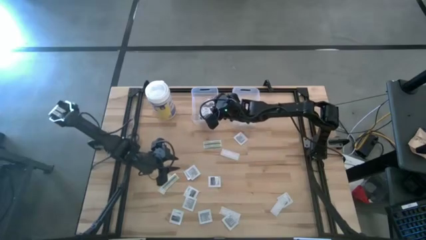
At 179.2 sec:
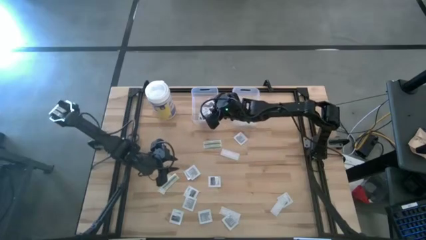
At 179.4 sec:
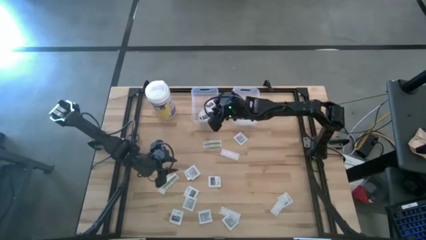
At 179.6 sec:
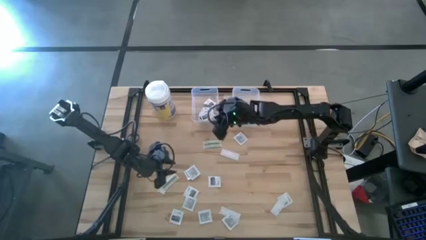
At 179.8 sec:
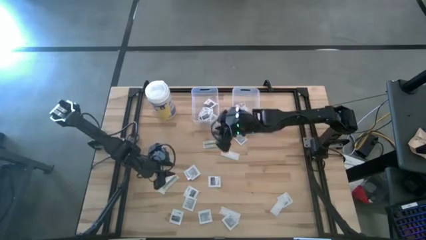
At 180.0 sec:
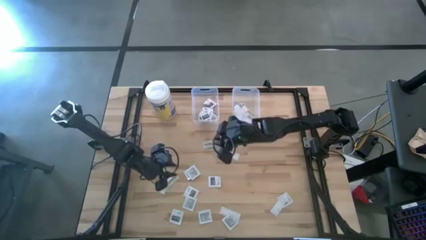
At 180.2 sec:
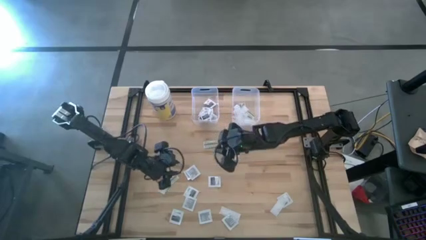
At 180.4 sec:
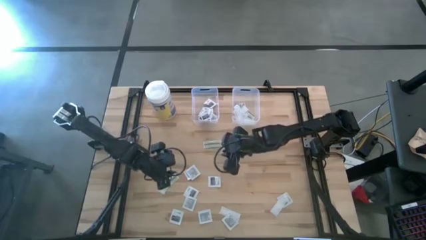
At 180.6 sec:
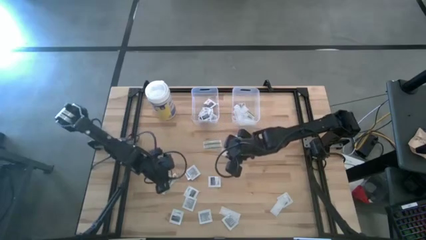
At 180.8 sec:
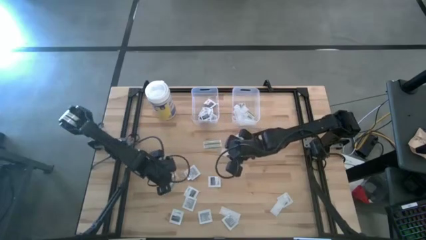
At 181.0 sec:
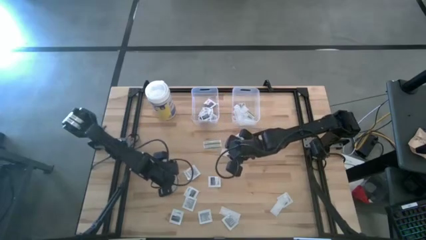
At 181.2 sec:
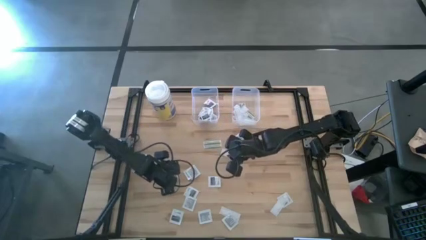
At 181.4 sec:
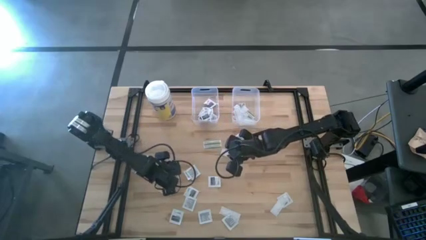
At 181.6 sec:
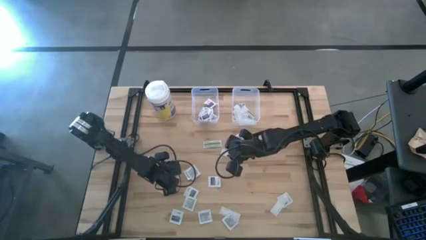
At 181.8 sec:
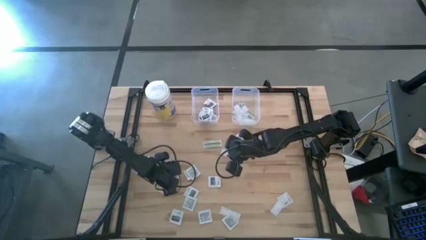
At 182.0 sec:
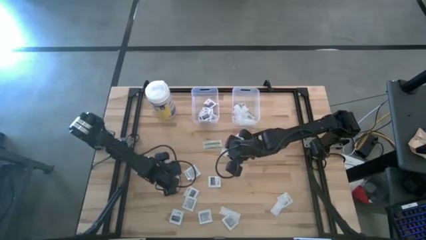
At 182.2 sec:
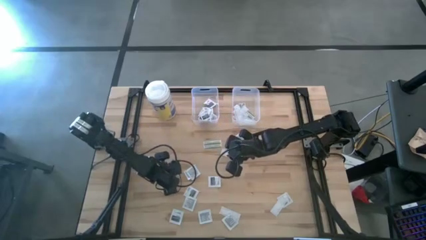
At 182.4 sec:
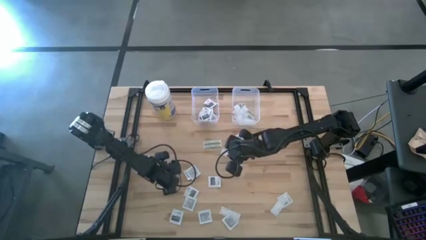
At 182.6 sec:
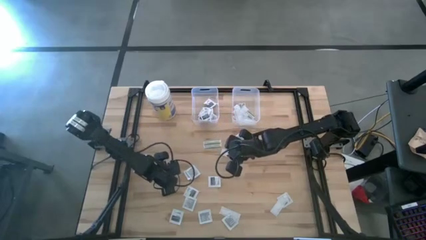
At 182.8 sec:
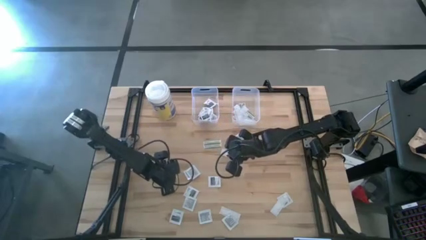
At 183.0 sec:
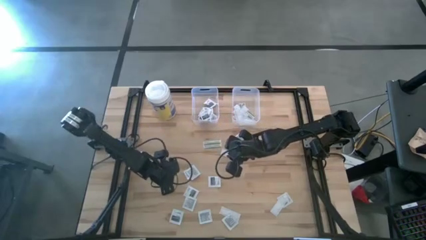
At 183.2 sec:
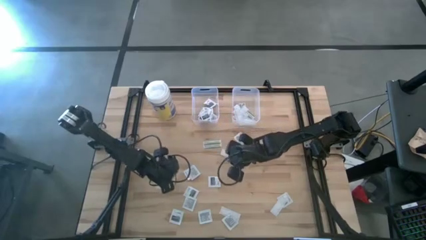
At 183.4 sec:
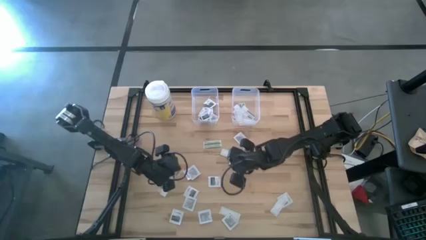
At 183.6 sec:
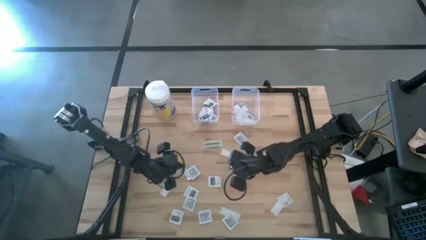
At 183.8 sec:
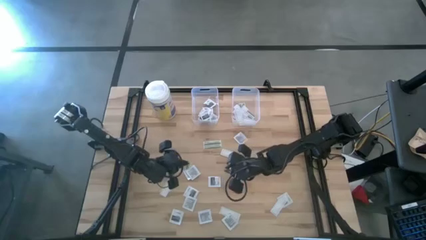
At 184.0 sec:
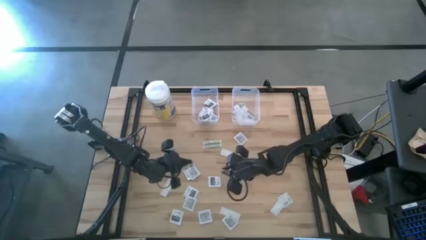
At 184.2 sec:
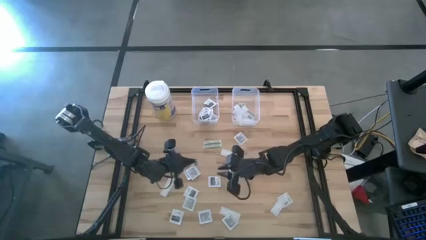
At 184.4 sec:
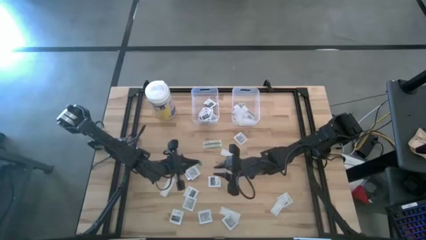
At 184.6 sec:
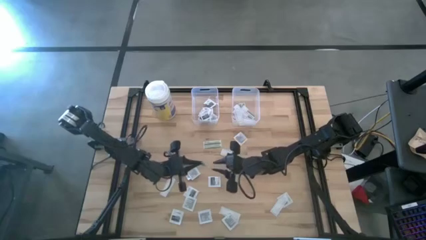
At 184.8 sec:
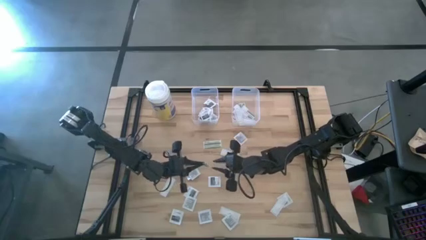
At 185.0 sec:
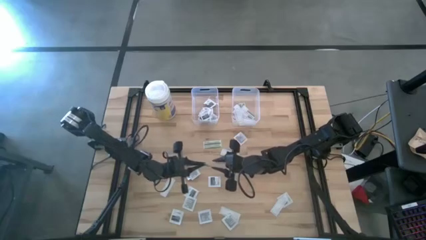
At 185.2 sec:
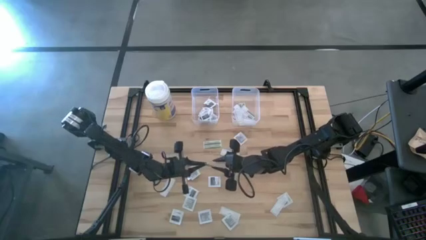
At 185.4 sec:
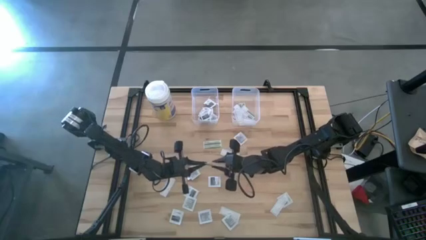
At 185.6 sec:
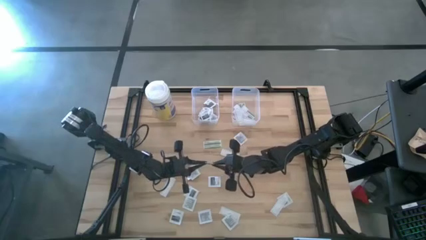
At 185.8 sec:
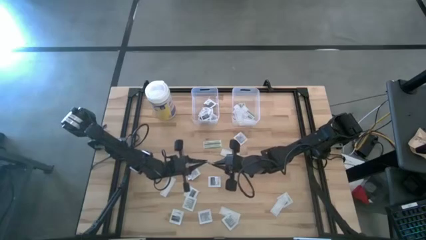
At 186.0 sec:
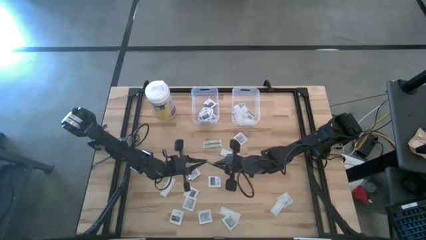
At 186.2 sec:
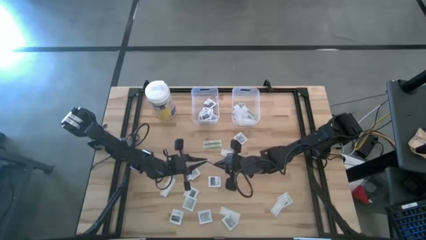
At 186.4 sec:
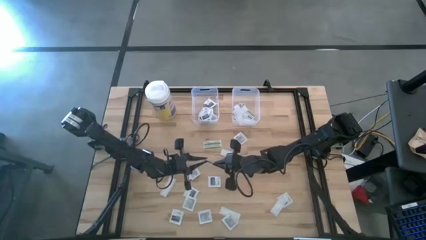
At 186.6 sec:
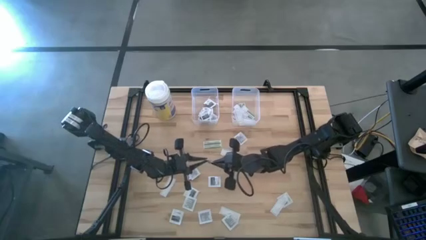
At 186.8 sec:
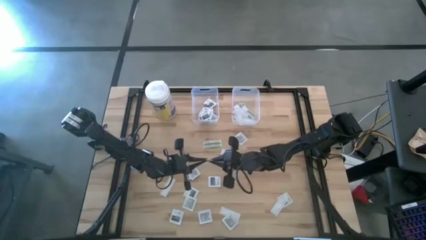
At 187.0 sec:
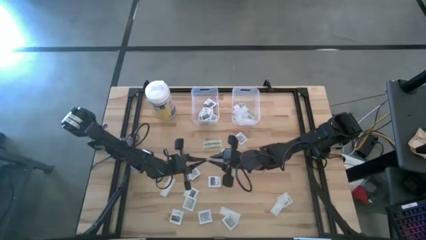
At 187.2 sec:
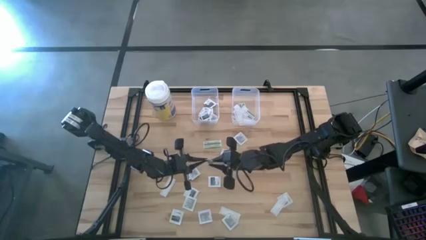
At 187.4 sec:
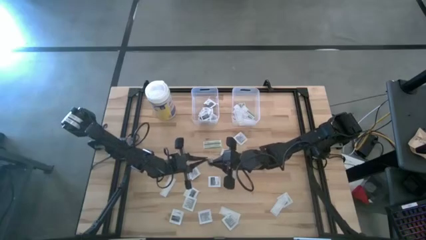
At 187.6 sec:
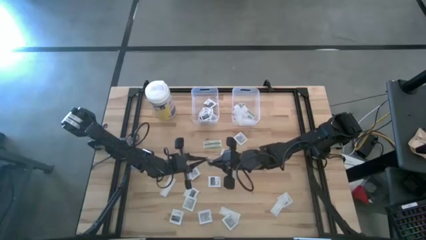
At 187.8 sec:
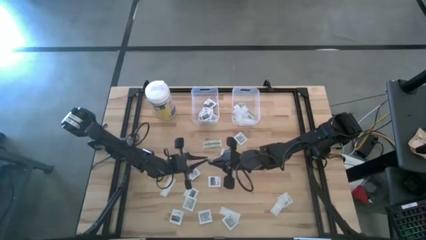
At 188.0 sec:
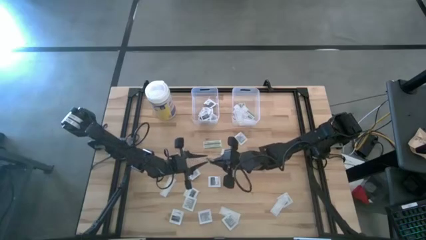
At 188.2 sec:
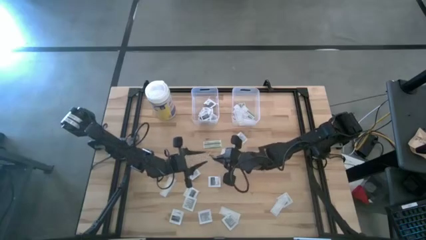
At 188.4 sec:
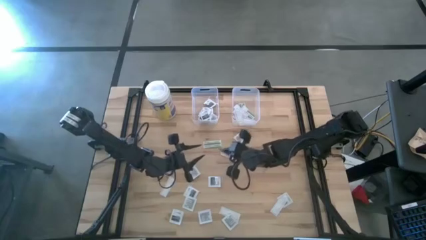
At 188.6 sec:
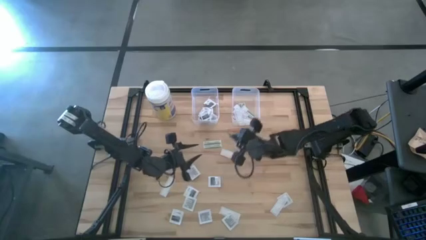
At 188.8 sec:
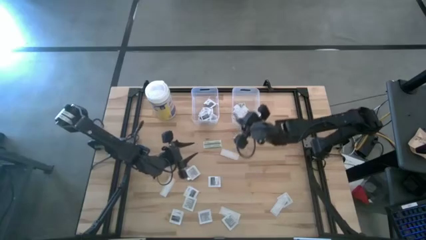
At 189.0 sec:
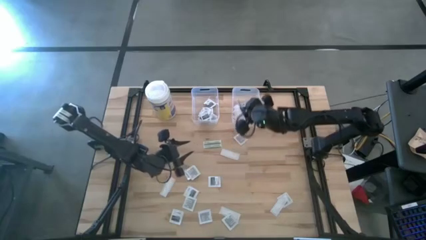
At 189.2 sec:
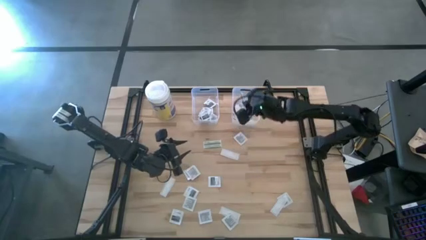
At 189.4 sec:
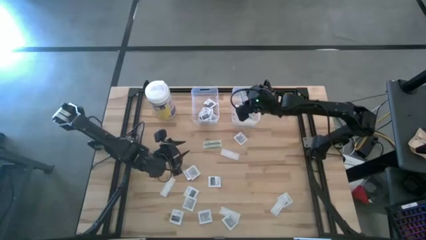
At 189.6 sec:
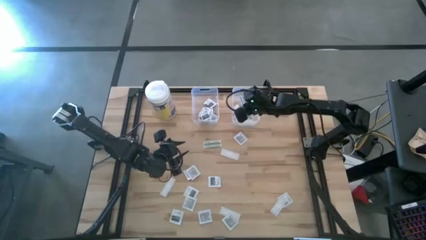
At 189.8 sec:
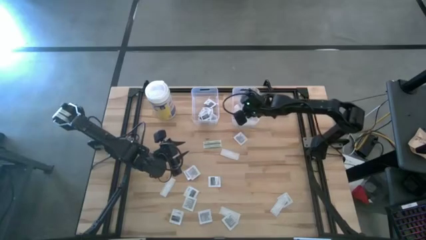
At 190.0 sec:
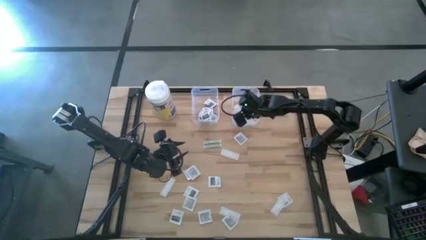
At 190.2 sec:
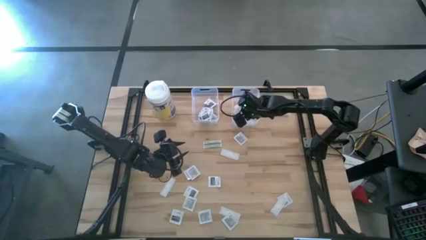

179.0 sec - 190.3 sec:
Task: Pick & Place First Aid Supplies
Put the bandage into the right transparent bin

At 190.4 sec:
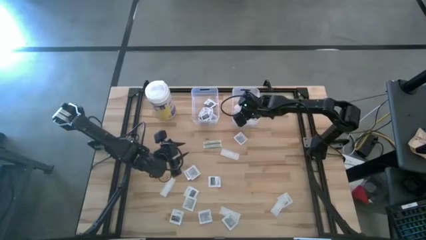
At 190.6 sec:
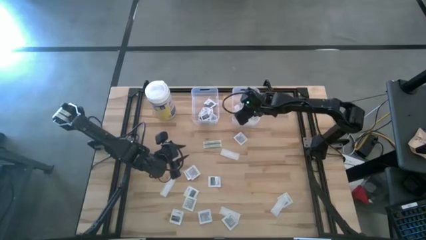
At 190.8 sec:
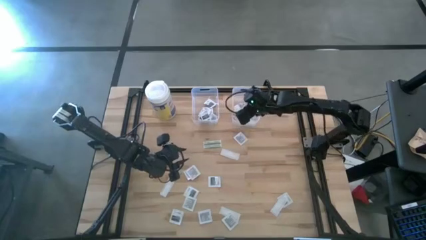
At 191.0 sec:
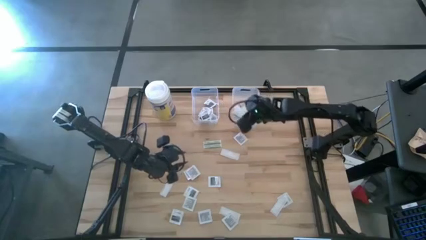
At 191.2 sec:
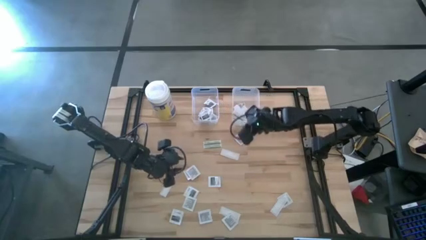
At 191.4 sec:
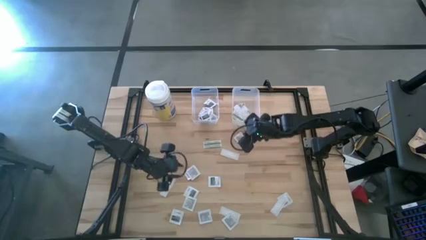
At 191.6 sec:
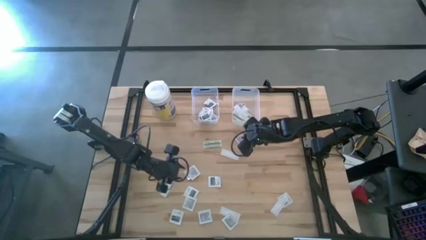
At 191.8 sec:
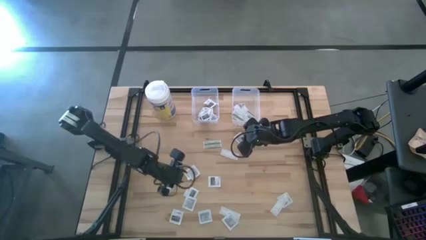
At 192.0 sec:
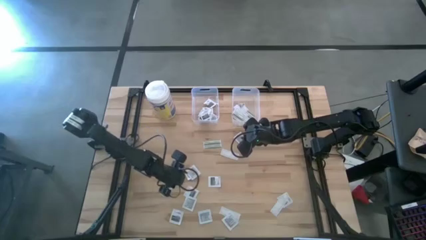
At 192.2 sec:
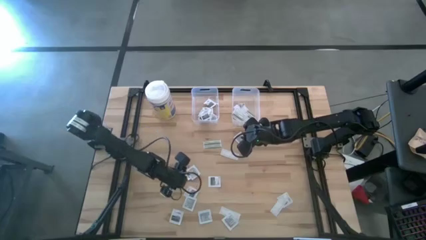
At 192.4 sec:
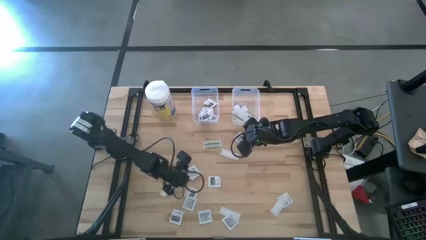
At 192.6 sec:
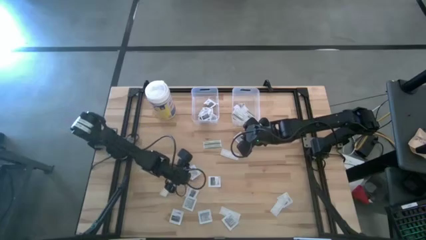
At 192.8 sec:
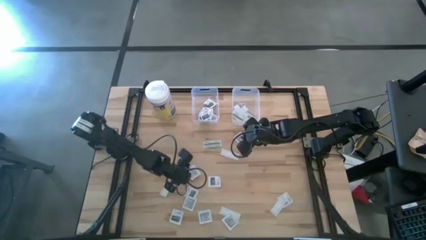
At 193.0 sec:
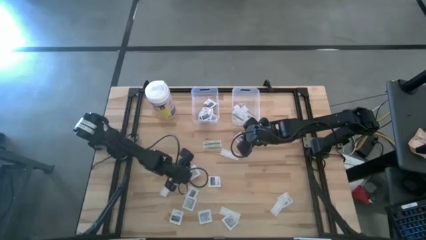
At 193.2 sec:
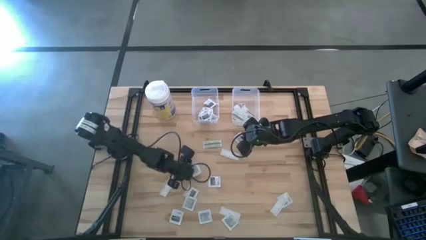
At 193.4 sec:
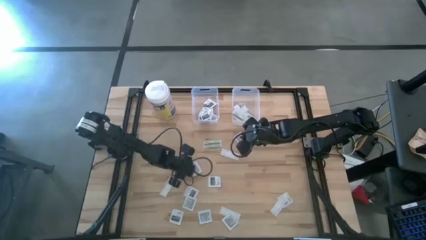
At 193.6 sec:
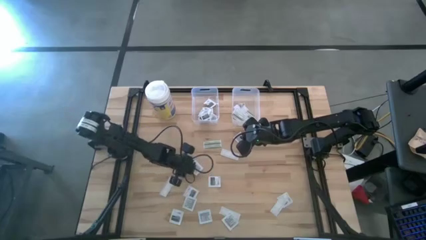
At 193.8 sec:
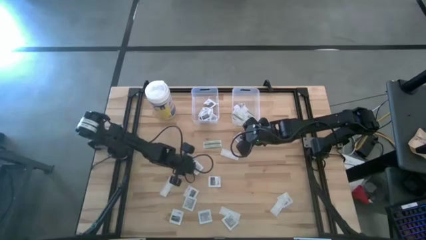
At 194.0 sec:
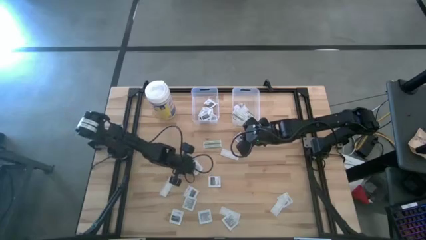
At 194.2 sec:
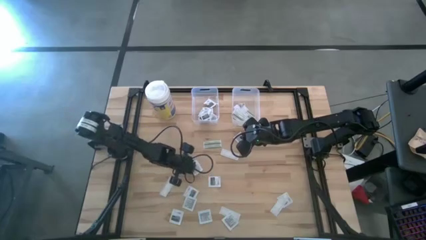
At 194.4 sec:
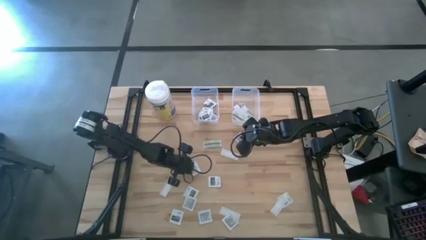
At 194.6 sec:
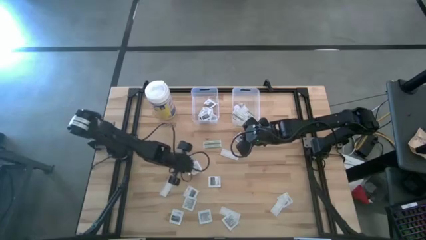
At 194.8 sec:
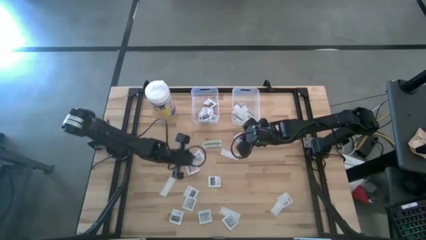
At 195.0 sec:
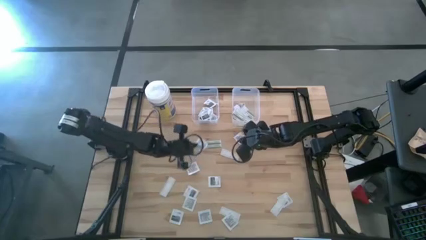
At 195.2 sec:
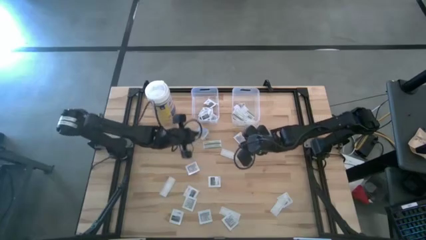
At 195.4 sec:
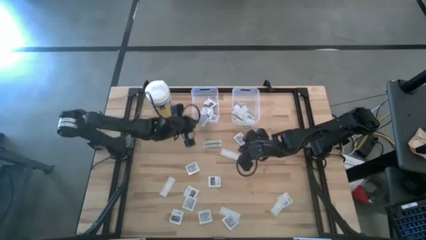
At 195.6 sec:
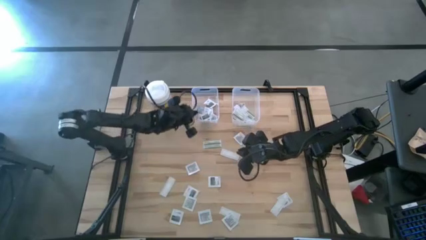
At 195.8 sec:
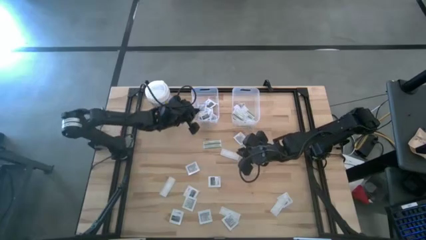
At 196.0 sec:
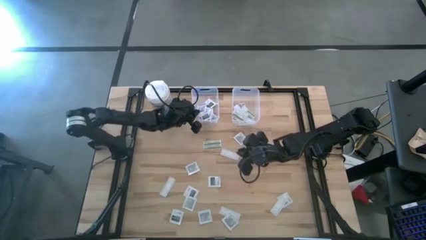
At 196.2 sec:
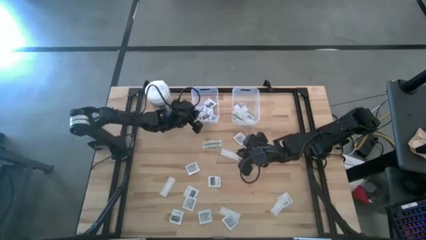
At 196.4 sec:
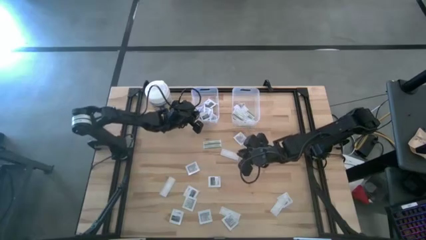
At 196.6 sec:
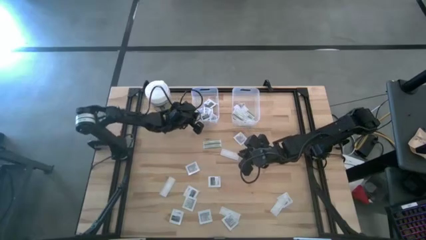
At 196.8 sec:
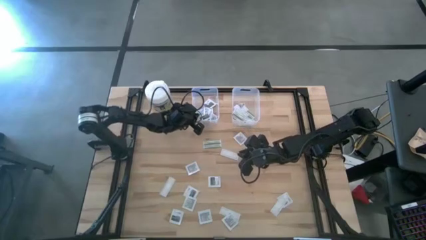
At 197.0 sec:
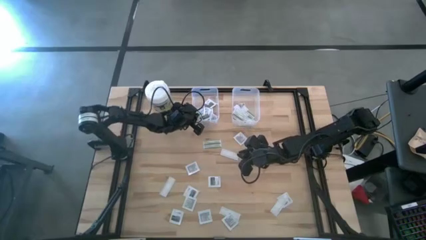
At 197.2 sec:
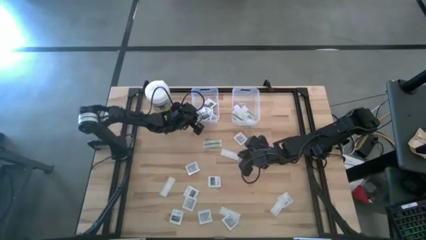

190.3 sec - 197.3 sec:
Put the towelette pack into the left transparent bin
